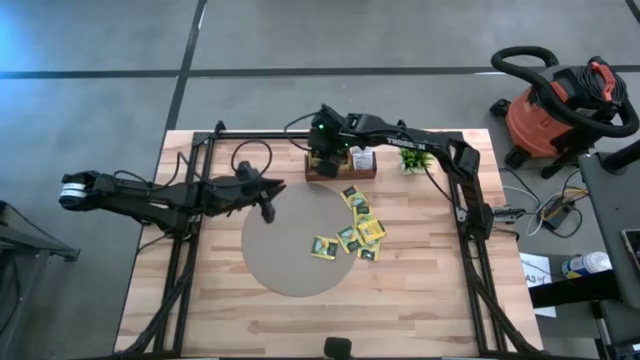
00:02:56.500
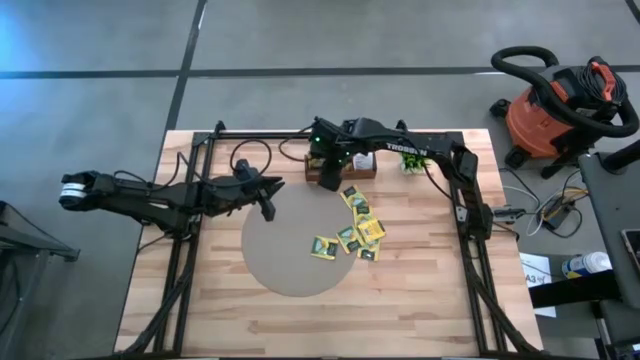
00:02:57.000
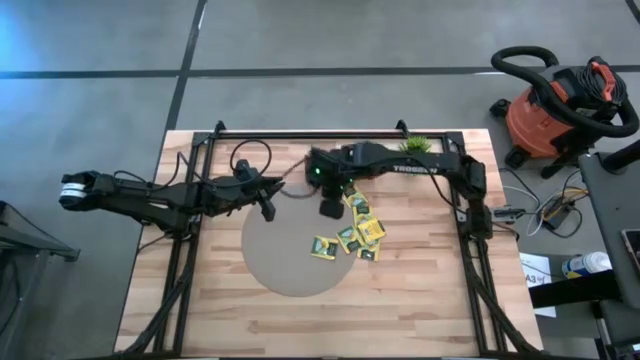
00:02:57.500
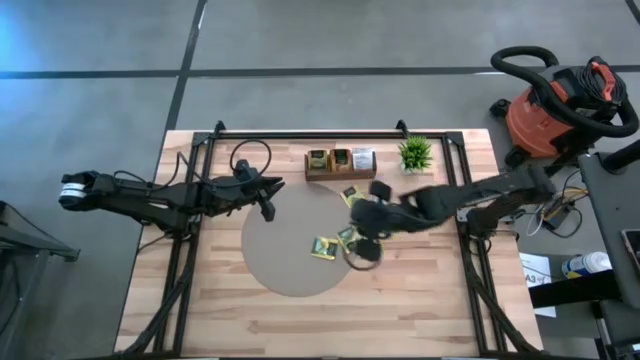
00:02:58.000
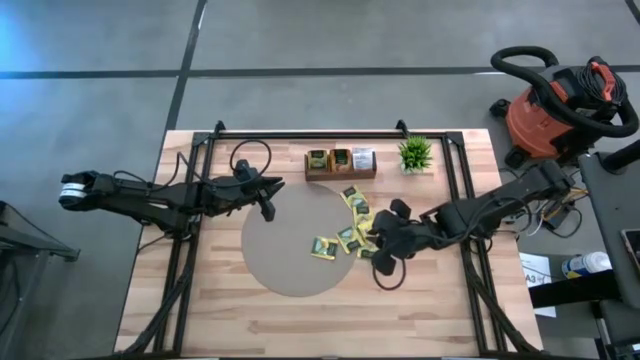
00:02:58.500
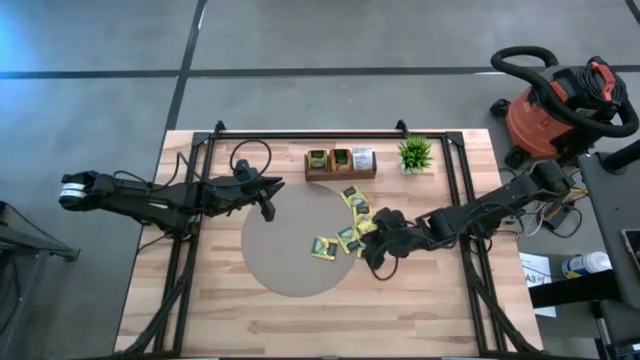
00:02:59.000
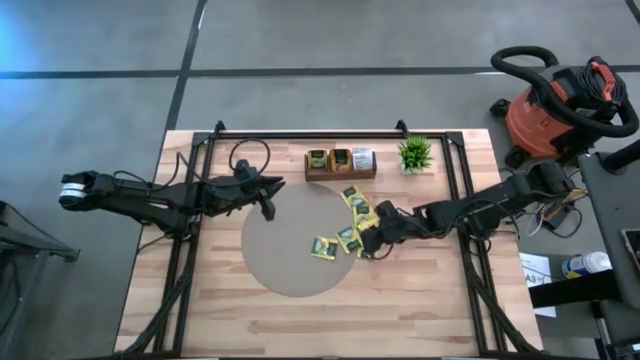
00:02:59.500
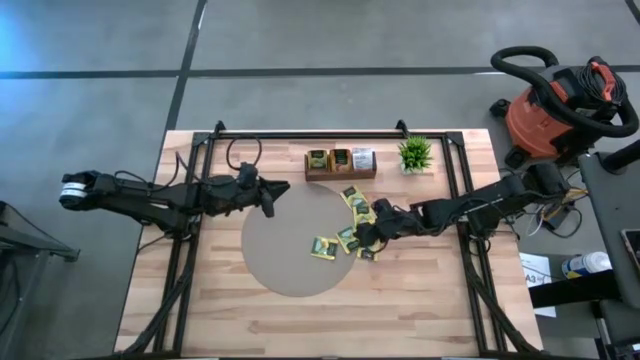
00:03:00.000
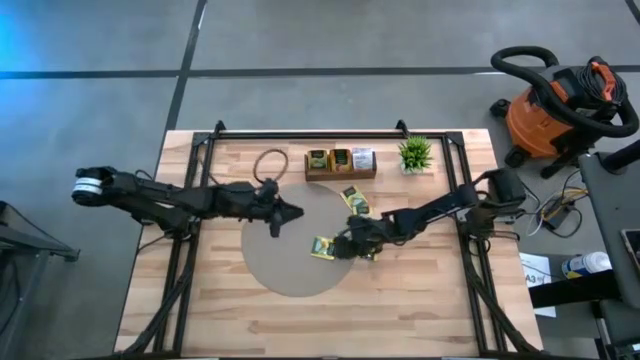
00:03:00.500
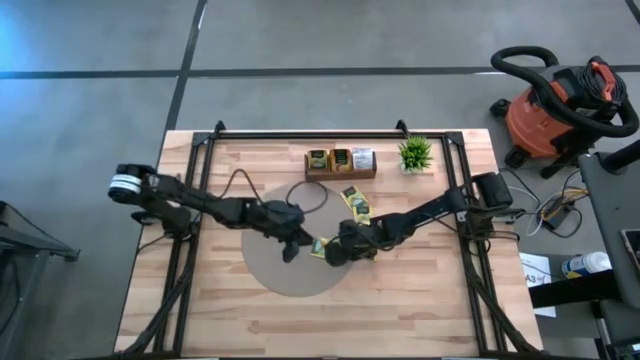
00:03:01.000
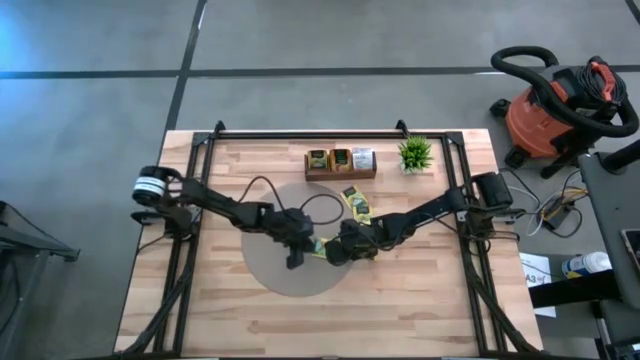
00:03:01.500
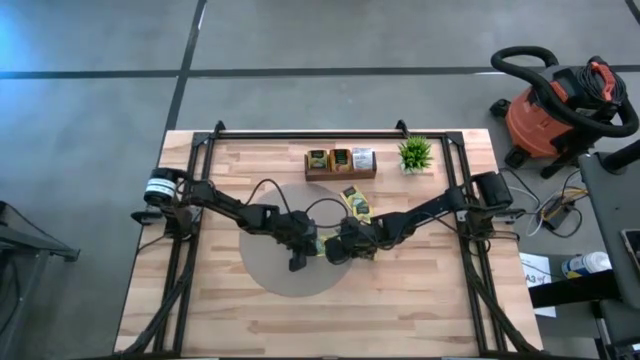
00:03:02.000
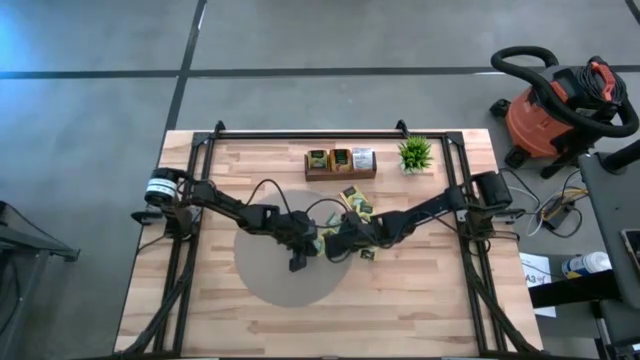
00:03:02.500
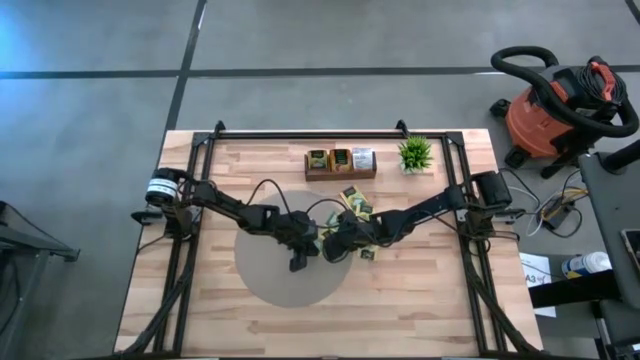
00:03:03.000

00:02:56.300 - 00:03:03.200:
Task: Pick & Place Tea
Put the yellow tea sachet into the left compartment of the wooden organizer

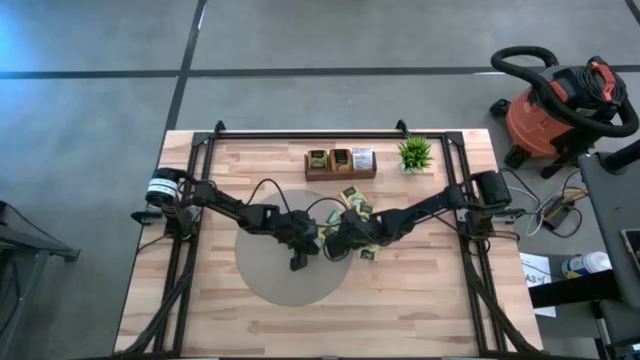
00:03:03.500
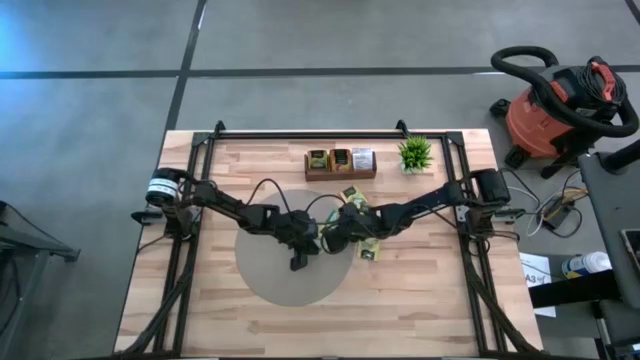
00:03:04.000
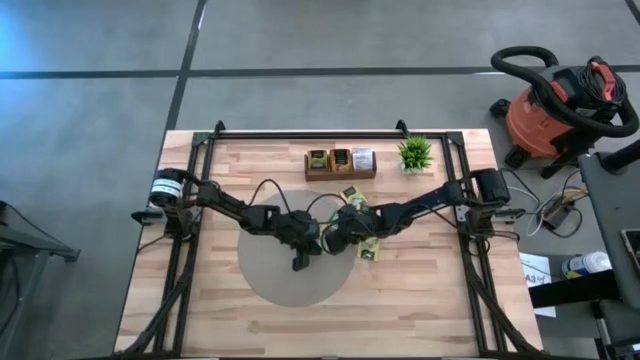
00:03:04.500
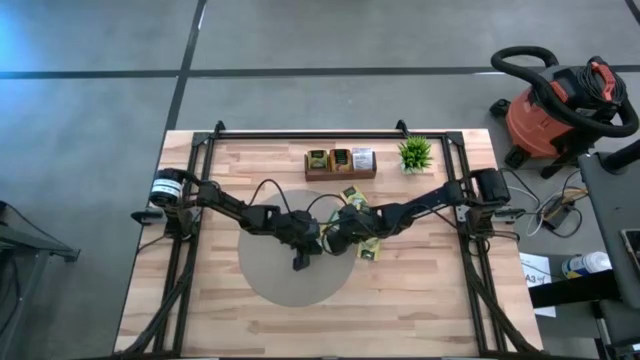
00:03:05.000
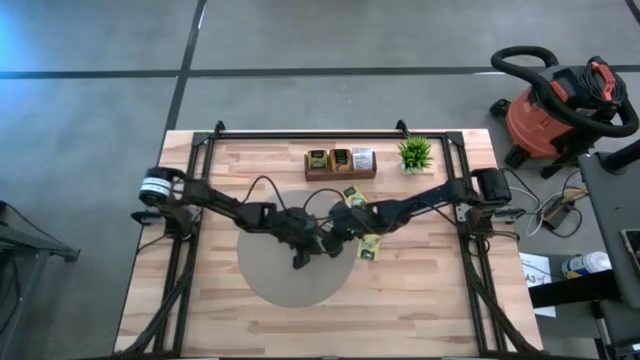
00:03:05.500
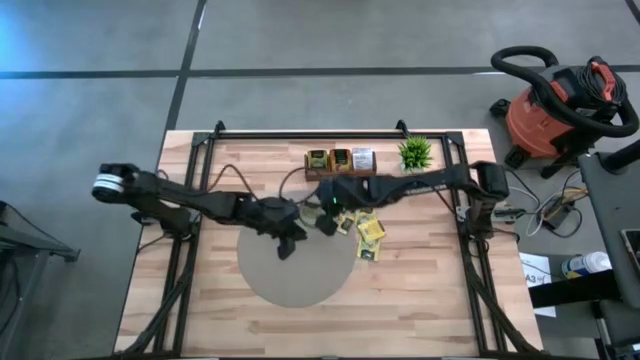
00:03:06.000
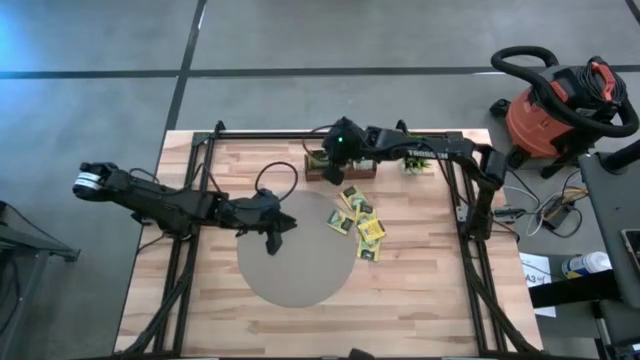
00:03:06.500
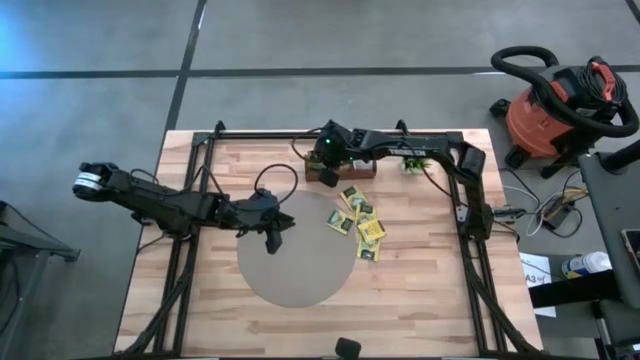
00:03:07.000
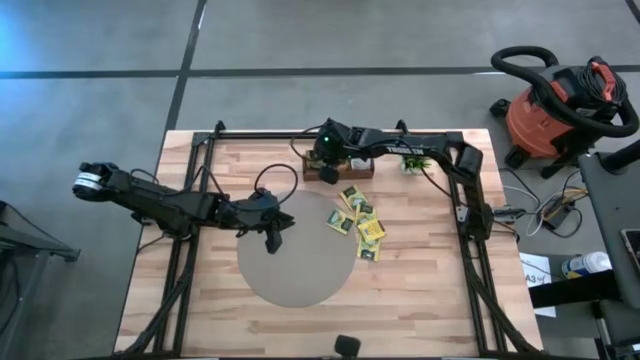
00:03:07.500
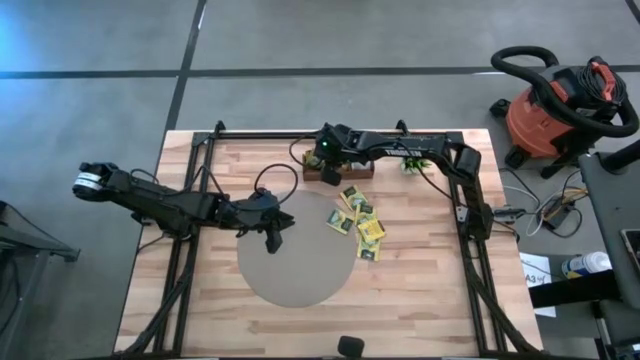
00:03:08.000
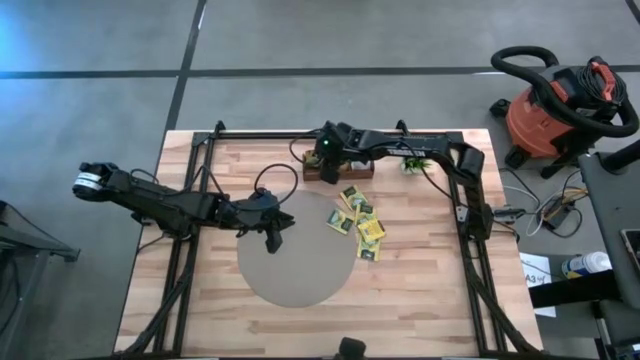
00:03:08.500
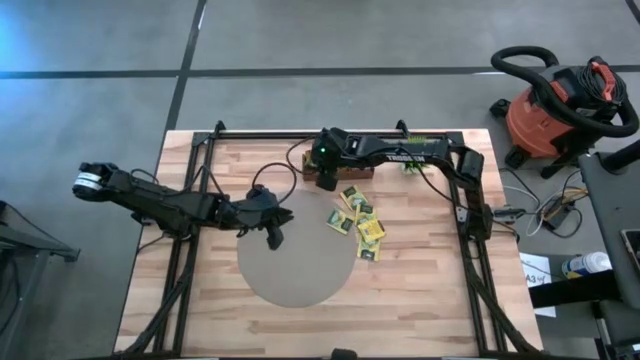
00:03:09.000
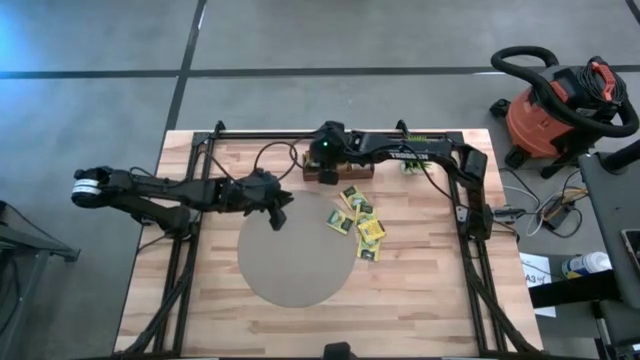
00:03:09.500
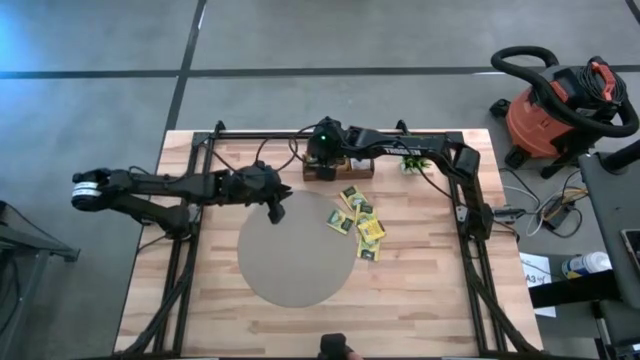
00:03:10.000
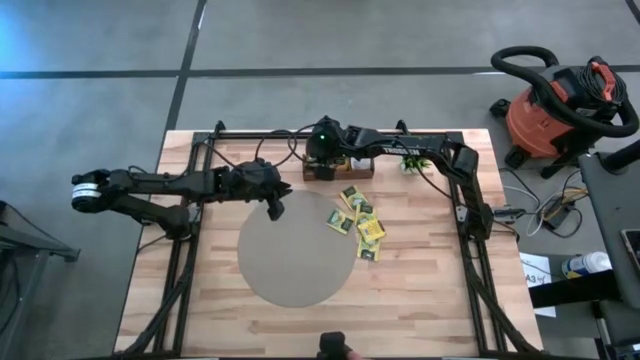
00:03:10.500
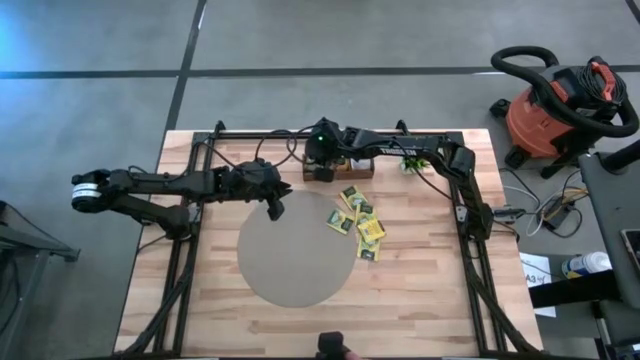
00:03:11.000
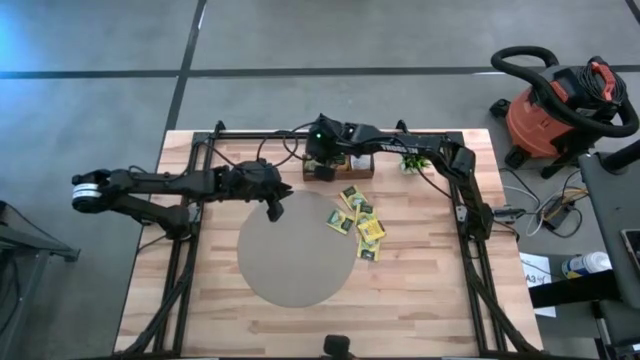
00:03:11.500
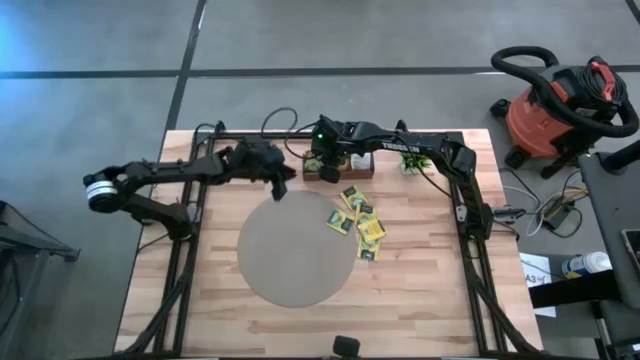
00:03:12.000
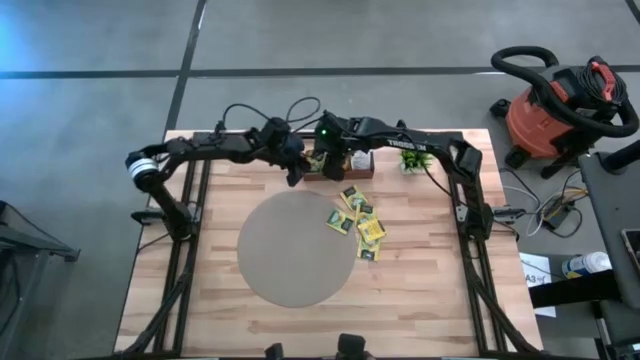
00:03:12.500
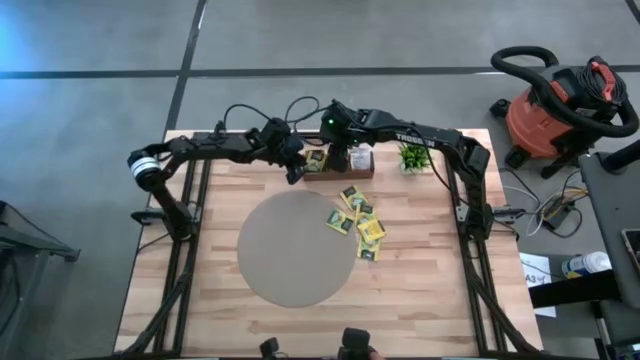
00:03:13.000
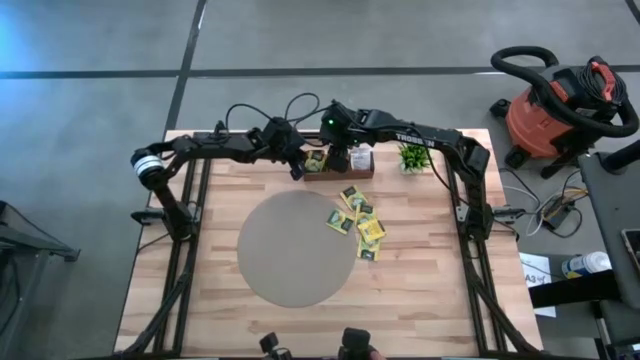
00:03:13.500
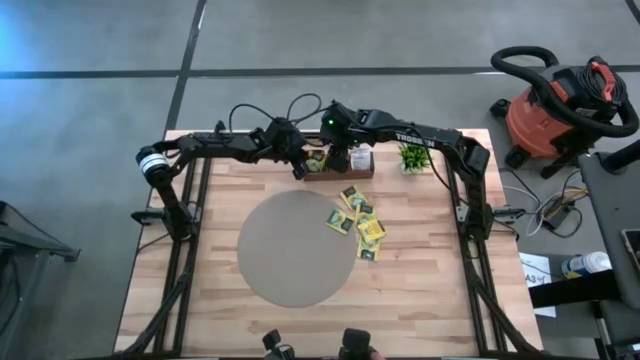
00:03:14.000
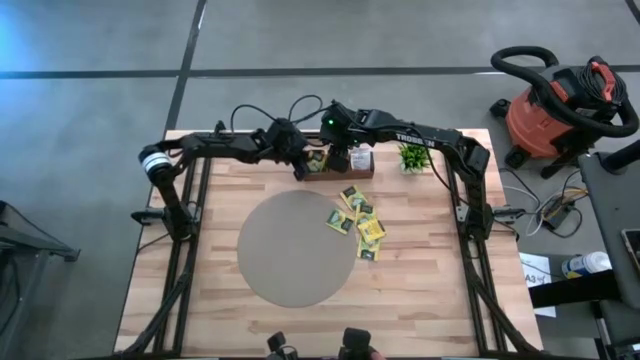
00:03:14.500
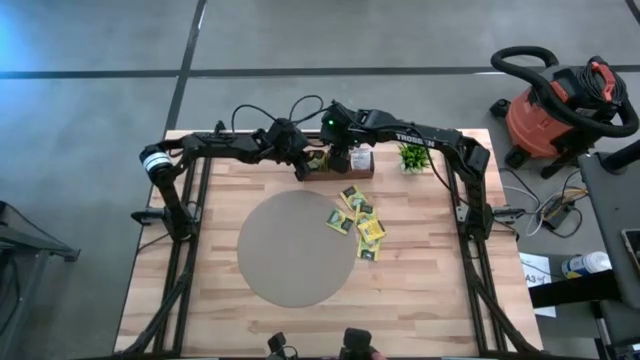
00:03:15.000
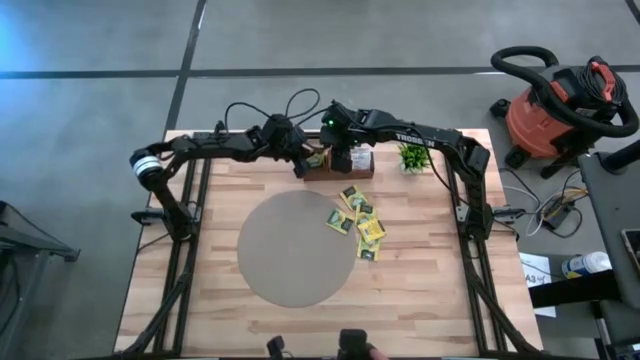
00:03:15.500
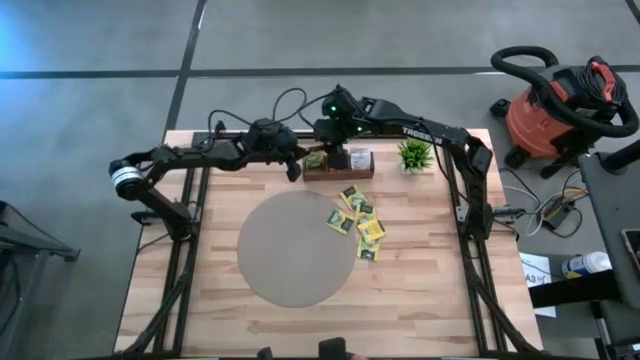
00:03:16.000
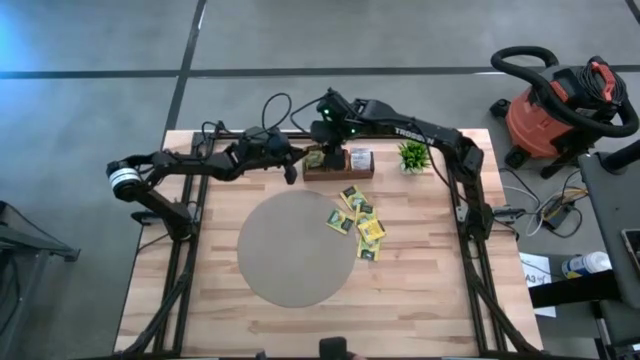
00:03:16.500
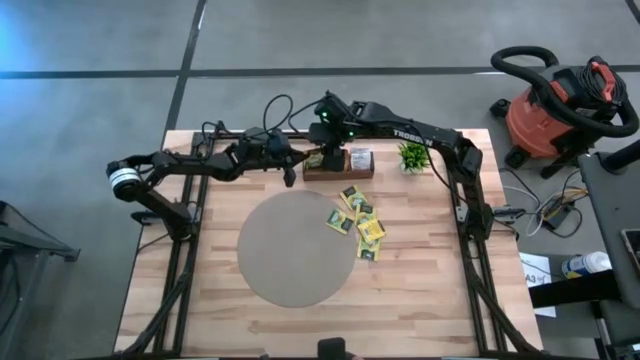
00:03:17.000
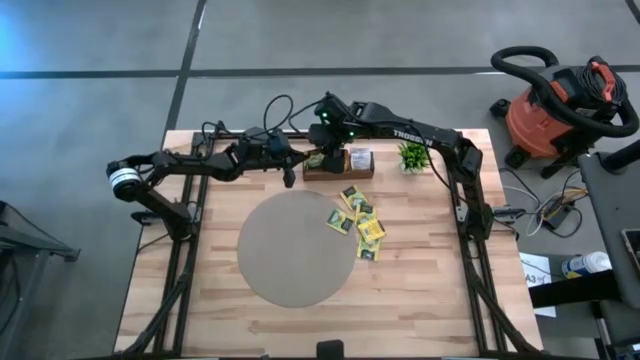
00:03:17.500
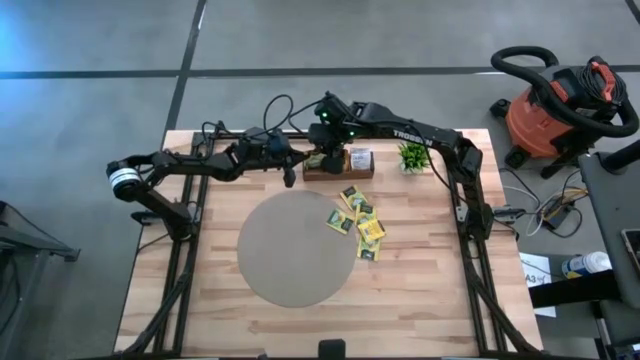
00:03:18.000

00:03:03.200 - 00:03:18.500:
Put the yellow tea sachet into the left compartment of the wooden organizer
